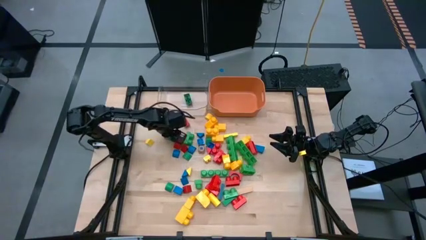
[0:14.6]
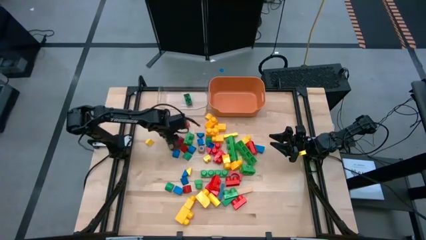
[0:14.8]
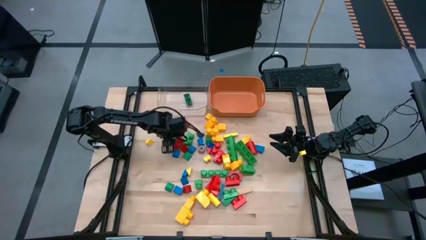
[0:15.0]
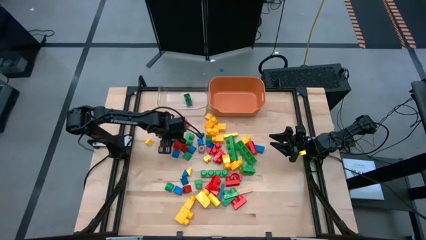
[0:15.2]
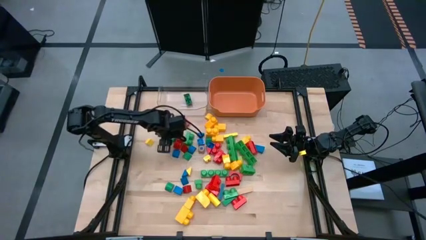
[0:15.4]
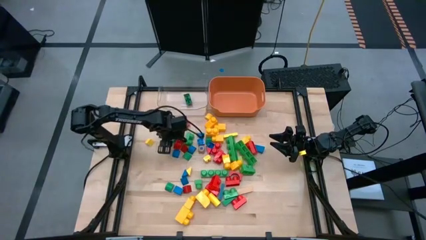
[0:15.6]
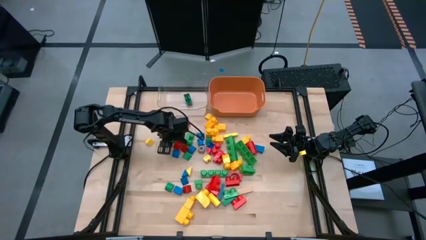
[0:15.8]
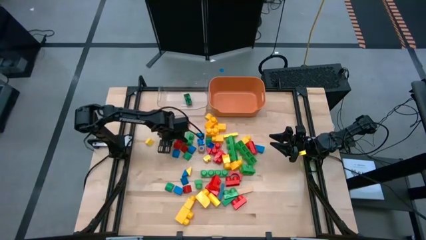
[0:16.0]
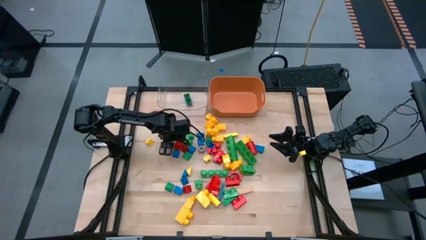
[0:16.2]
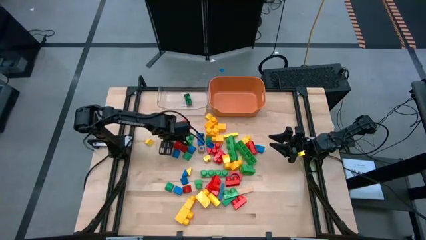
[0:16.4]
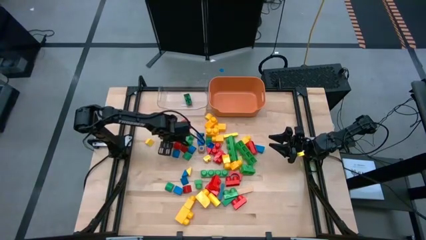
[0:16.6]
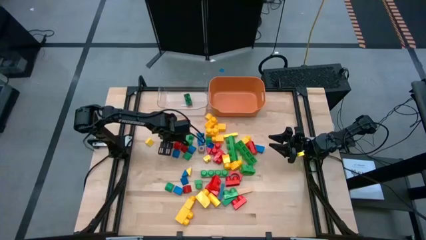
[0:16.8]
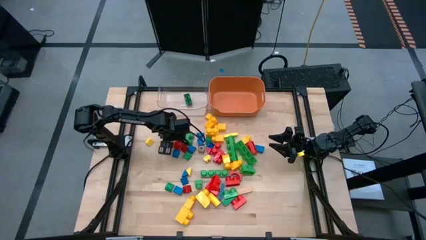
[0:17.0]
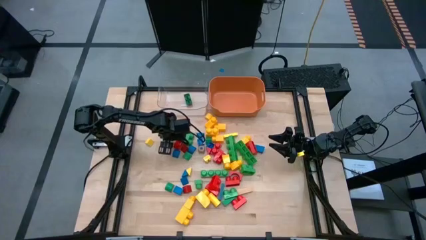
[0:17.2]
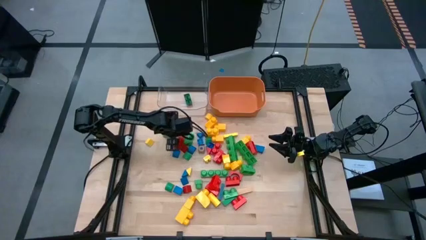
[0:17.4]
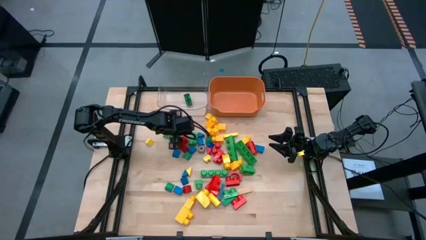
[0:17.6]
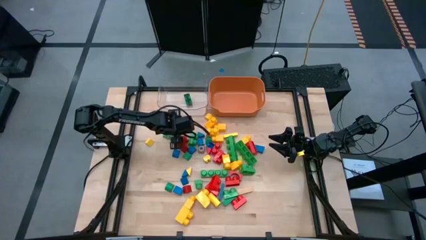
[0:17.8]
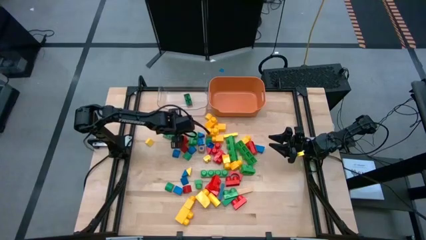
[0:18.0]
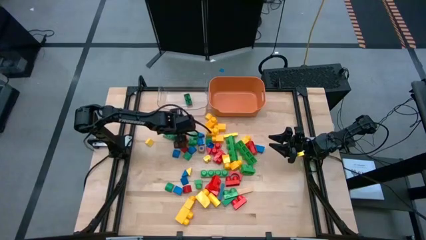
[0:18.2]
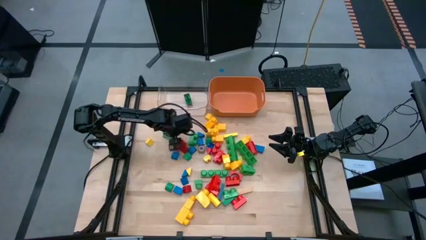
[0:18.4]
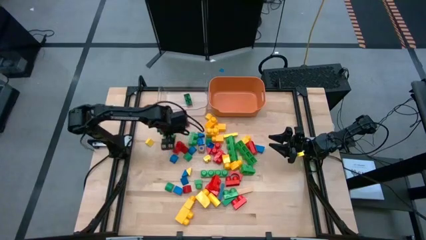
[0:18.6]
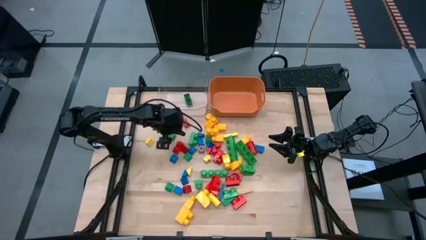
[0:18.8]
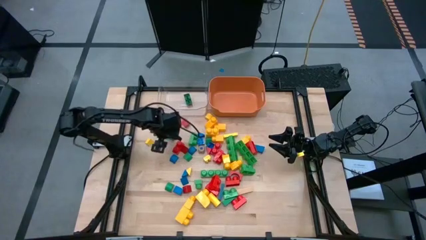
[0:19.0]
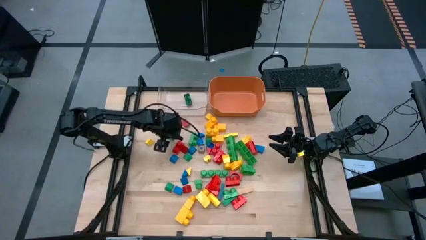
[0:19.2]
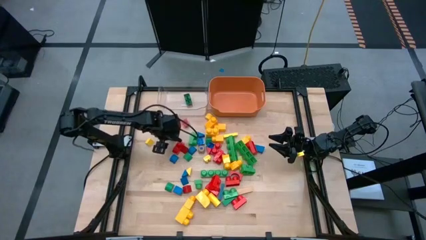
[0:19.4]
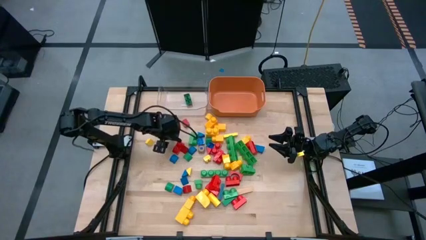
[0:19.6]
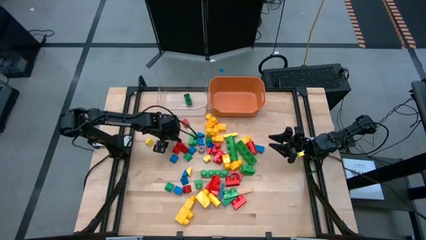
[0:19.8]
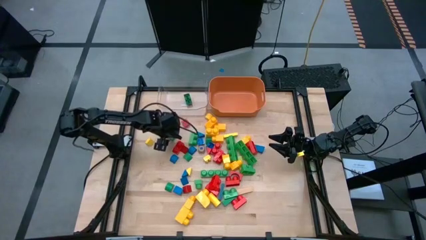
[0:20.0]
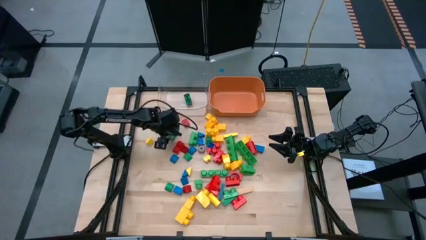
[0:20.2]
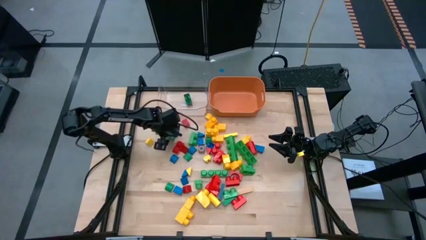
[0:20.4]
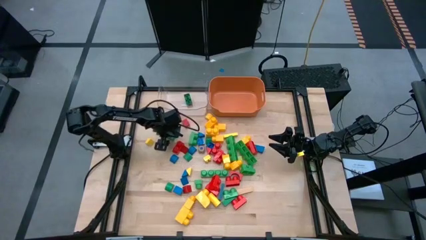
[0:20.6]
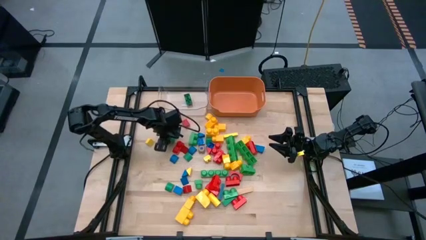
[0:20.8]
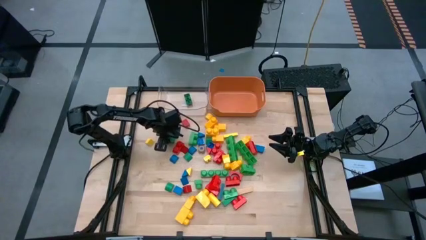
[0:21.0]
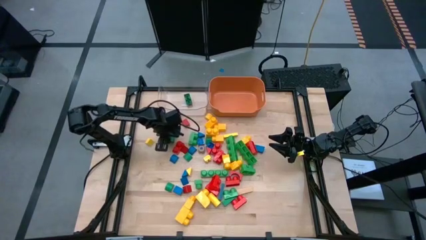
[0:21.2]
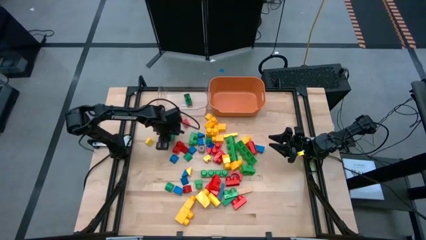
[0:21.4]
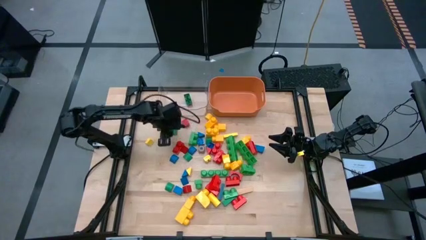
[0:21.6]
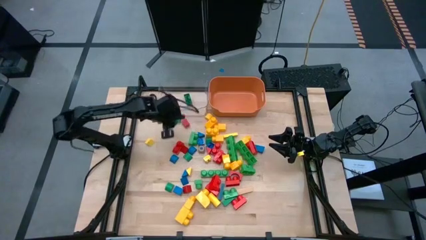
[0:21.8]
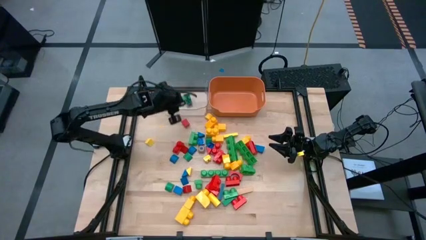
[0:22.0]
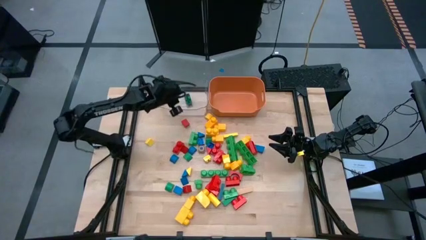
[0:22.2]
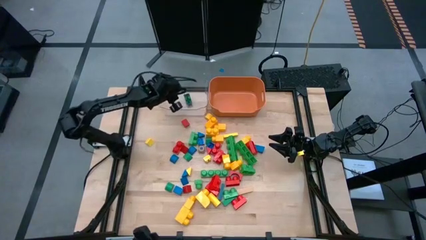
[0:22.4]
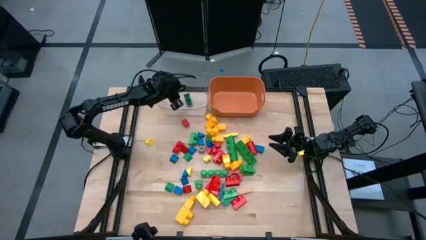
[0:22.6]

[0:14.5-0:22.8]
Task: Sort blocks by size
Put the small green game piece into the transparent bin

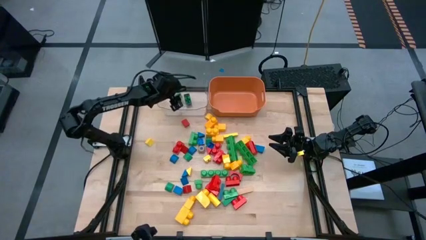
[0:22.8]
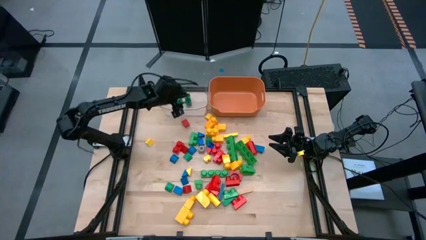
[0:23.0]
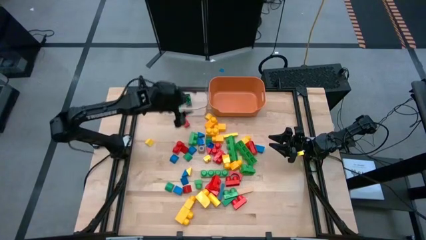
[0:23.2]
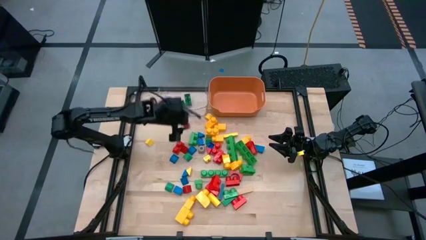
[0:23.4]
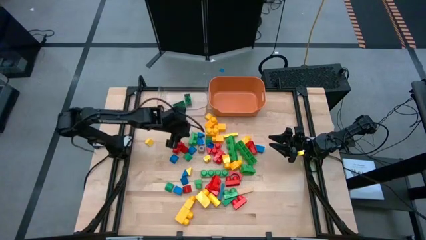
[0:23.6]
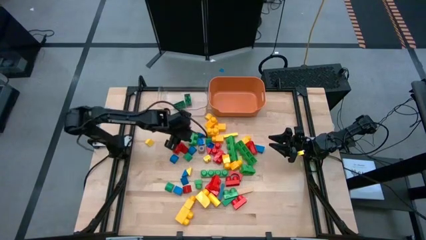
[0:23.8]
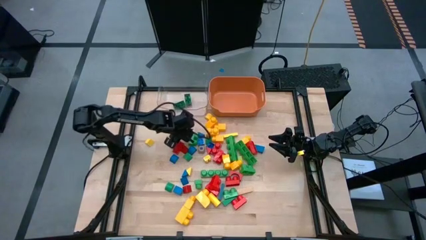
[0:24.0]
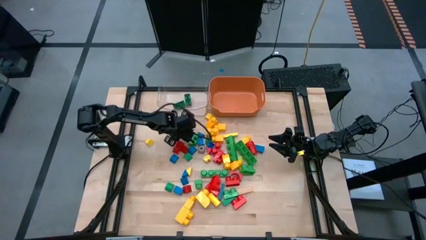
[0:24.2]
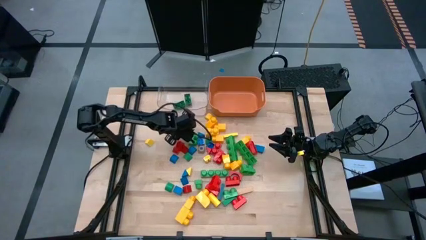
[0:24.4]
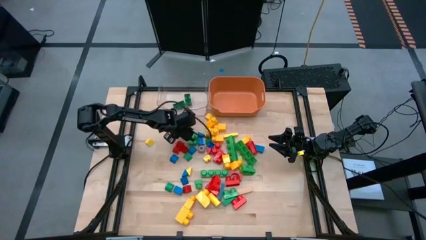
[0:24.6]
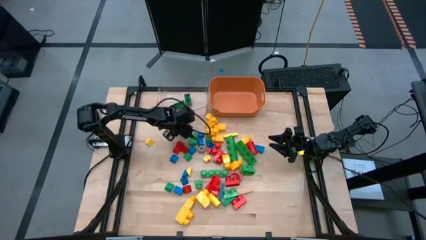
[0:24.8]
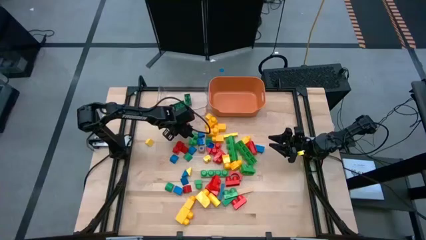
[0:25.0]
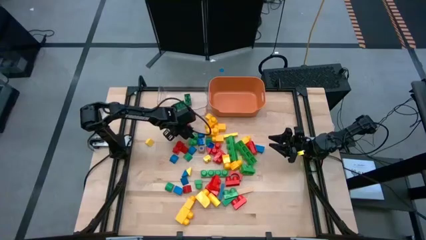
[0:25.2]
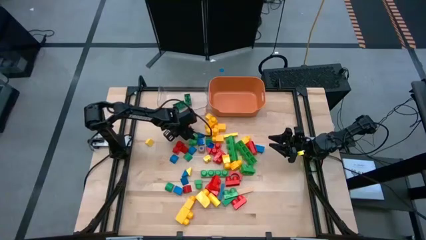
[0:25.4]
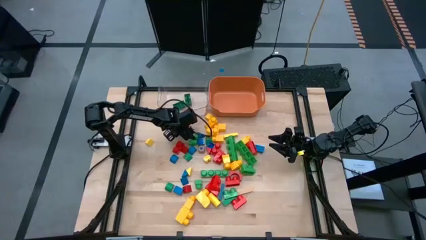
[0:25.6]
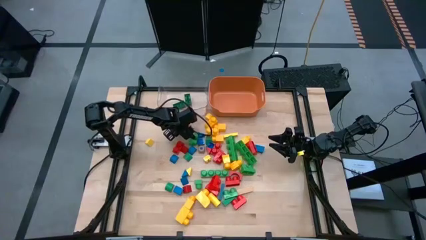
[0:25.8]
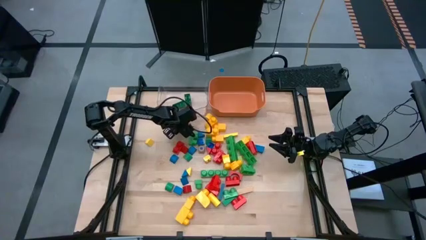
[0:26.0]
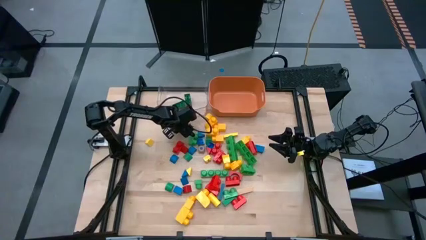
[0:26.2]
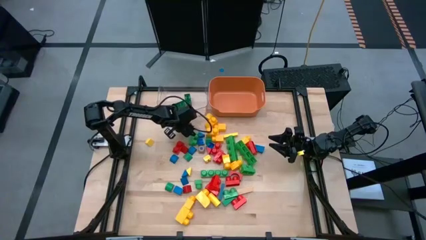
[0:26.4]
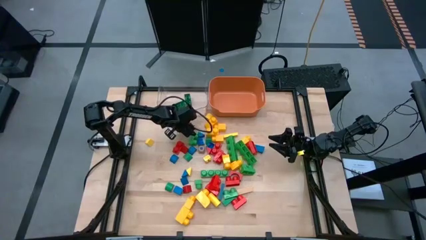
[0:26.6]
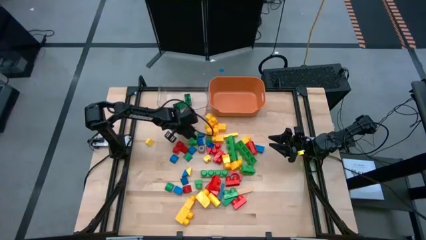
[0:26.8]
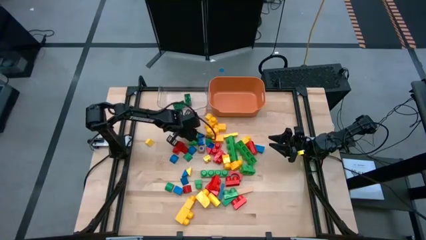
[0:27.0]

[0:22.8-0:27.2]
Put the small red block into the transparent bin

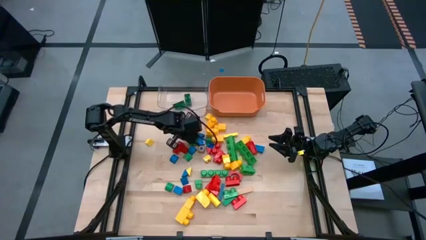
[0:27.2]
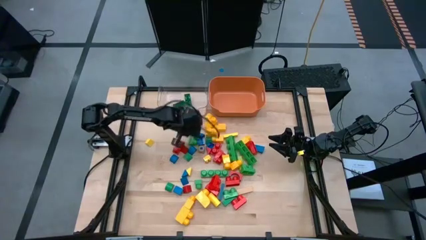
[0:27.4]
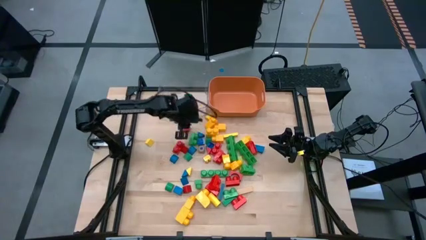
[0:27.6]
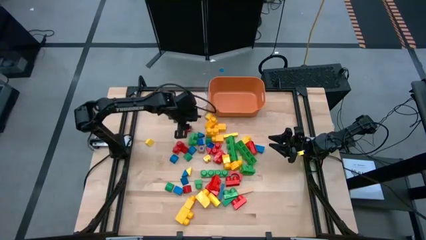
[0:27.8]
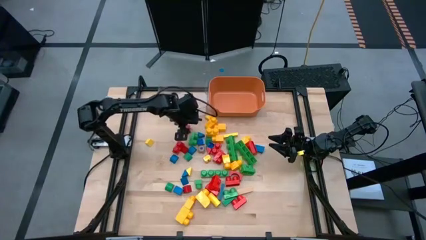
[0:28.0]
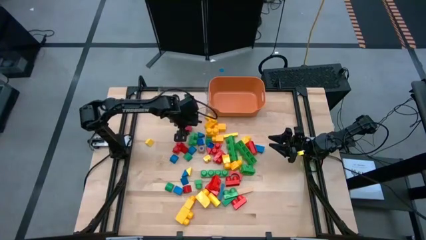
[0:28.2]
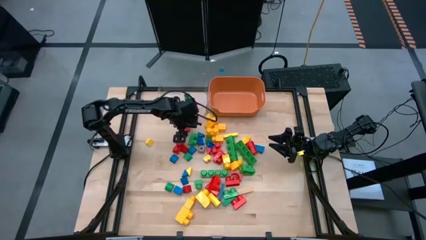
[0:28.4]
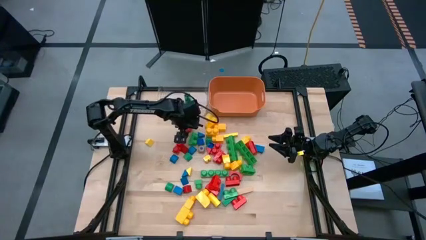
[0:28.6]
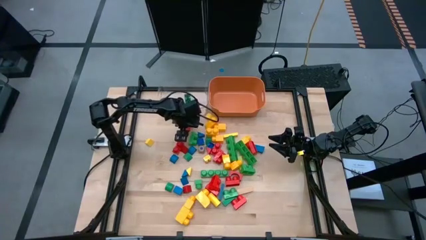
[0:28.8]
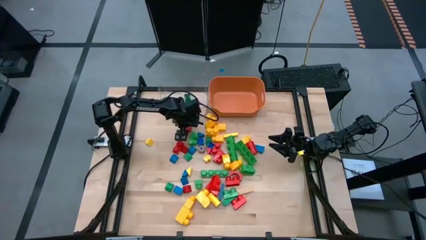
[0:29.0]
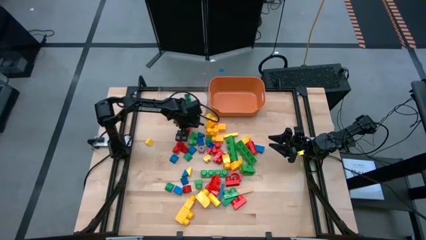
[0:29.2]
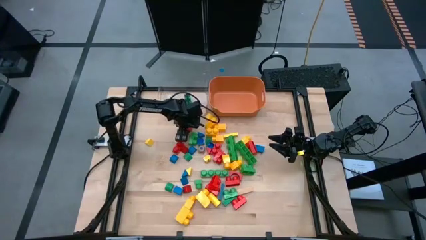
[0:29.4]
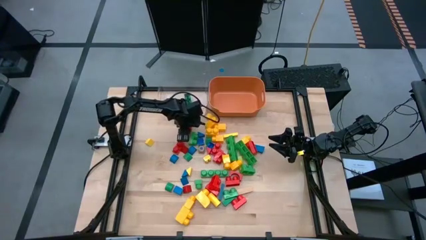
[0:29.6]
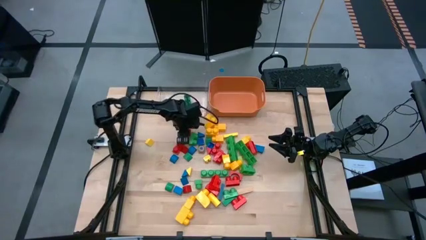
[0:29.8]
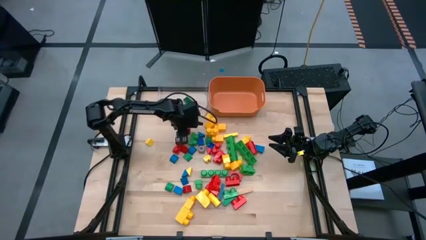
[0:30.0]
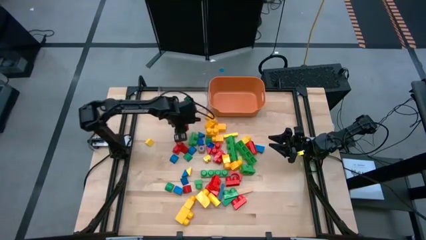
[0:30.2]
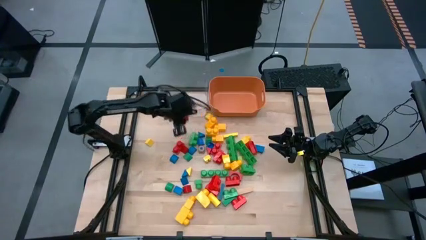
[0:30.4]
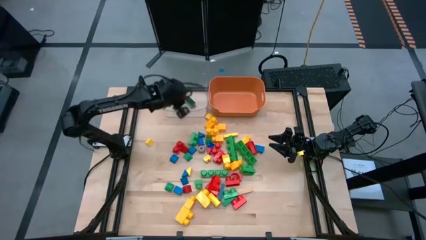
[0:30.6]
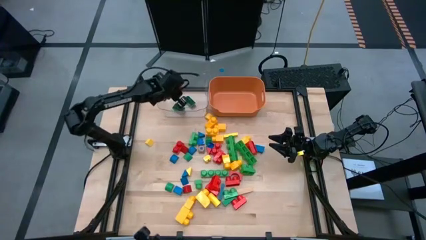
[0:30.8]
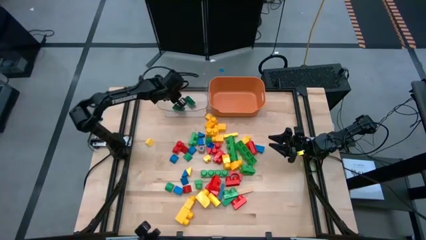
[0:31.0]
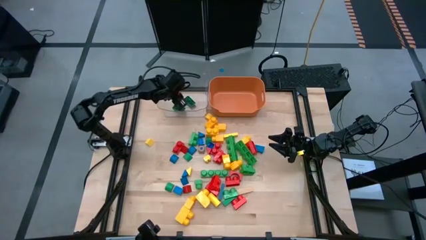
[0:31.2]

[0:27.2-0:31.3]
Put the small red block into the transparent bin
